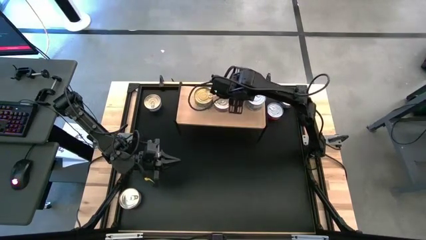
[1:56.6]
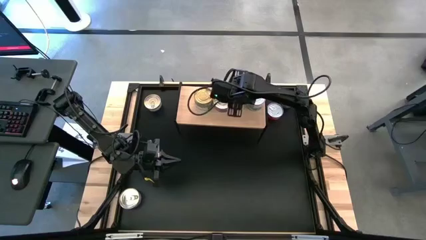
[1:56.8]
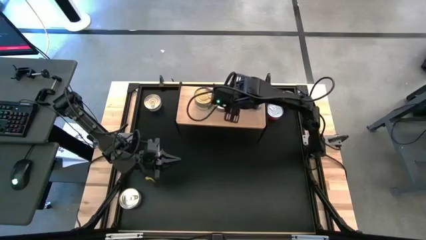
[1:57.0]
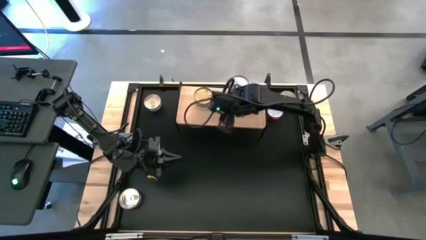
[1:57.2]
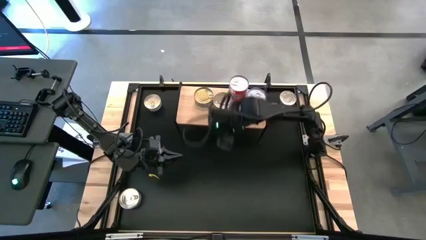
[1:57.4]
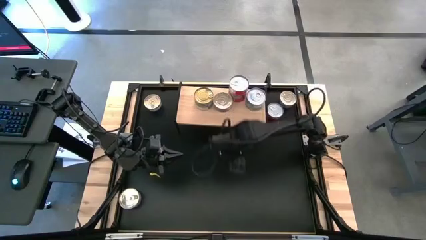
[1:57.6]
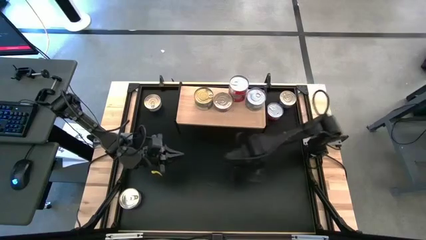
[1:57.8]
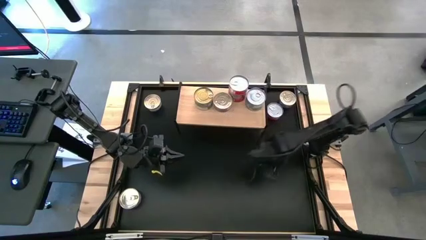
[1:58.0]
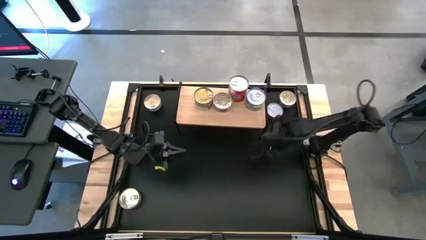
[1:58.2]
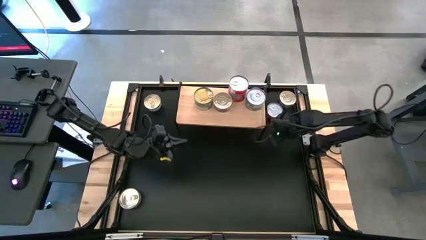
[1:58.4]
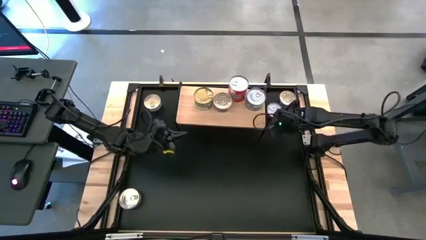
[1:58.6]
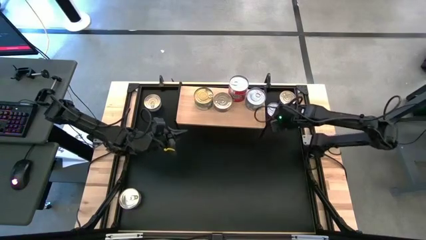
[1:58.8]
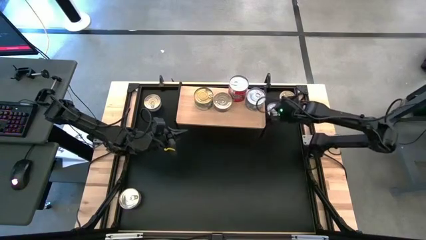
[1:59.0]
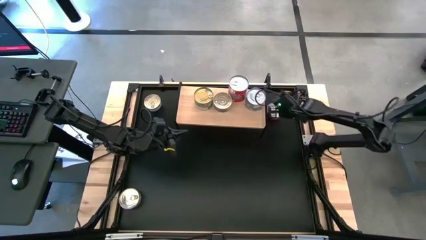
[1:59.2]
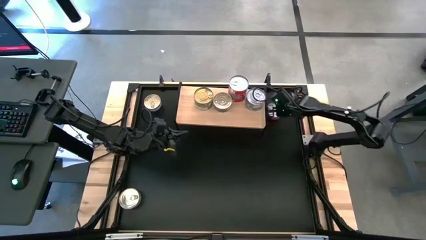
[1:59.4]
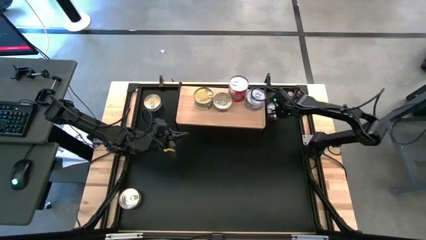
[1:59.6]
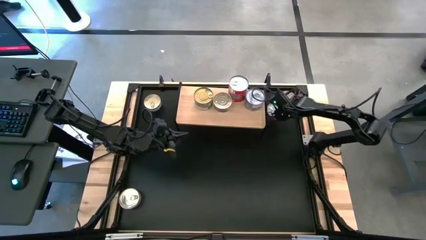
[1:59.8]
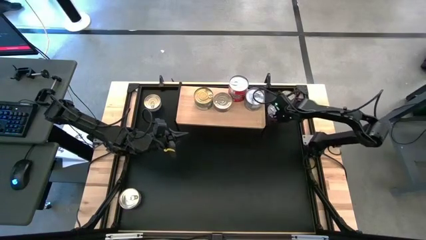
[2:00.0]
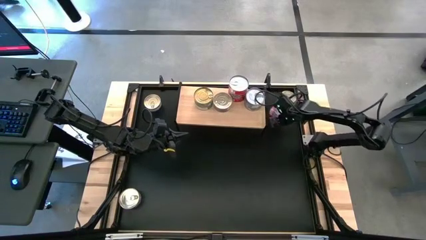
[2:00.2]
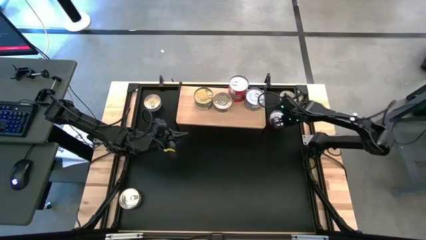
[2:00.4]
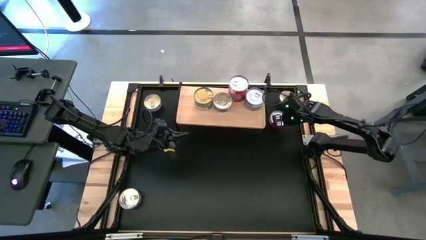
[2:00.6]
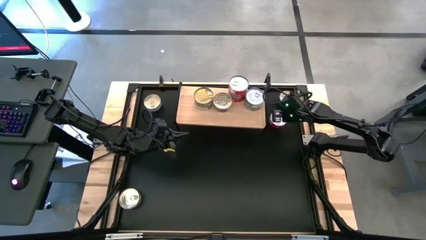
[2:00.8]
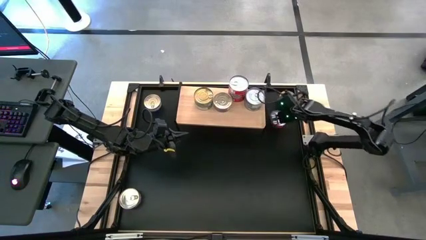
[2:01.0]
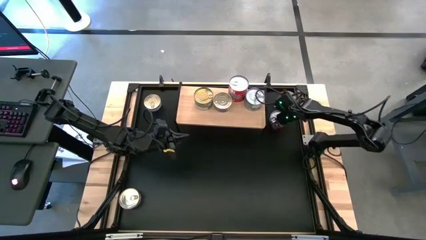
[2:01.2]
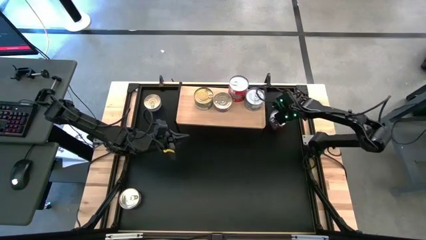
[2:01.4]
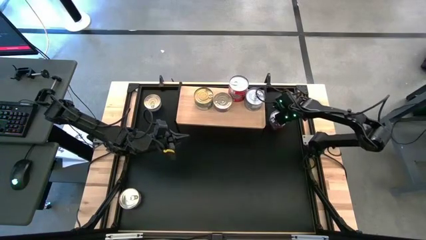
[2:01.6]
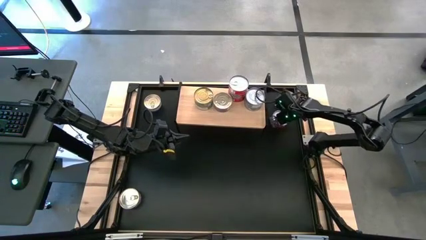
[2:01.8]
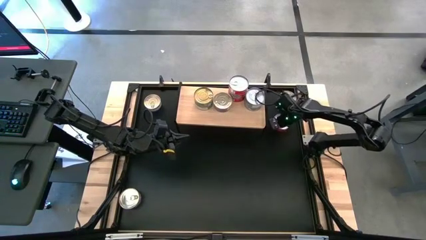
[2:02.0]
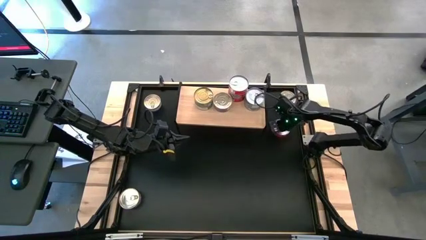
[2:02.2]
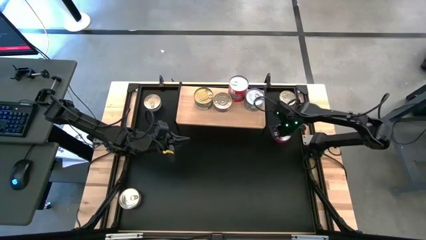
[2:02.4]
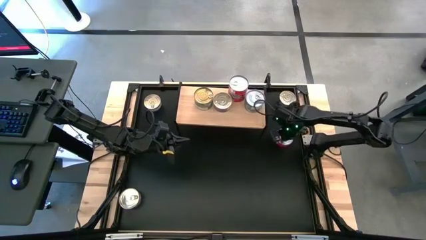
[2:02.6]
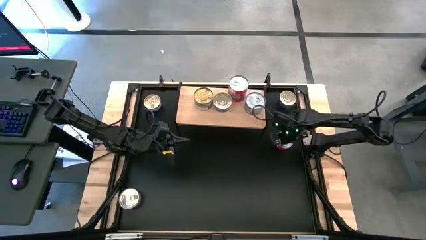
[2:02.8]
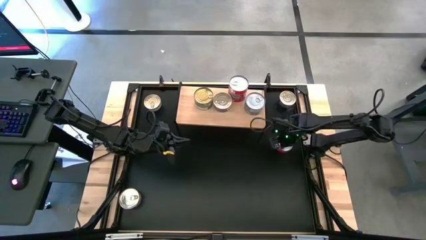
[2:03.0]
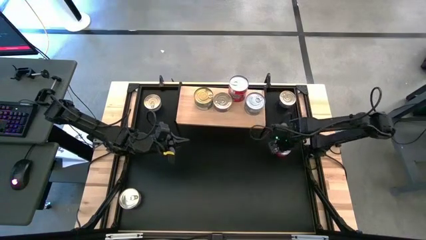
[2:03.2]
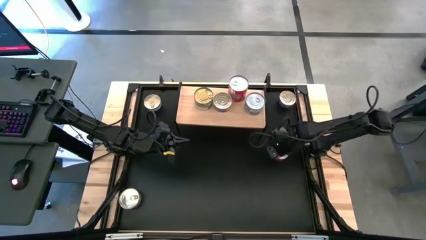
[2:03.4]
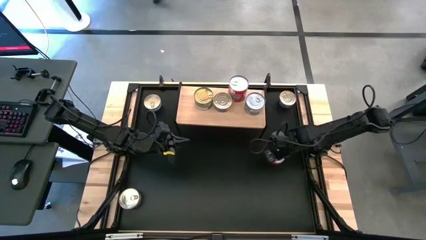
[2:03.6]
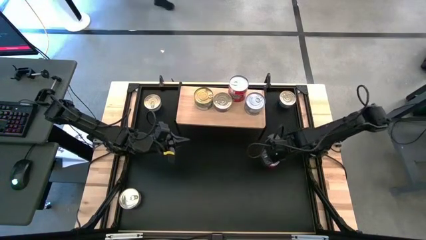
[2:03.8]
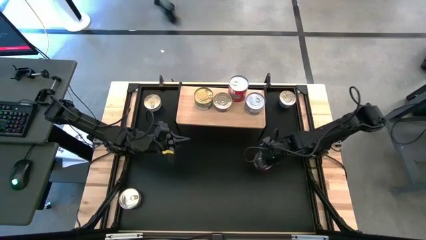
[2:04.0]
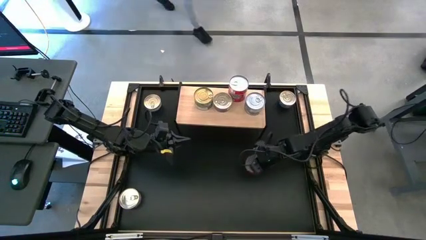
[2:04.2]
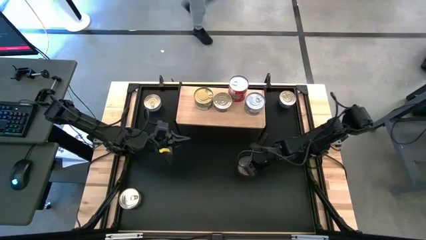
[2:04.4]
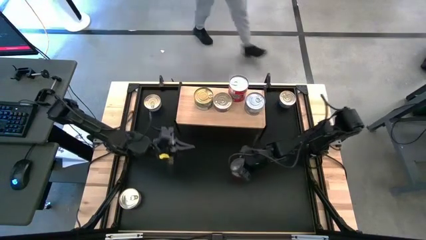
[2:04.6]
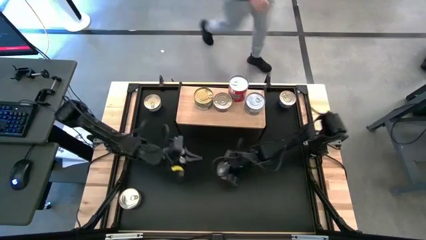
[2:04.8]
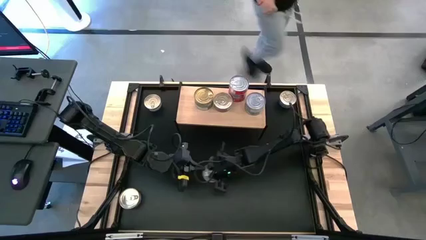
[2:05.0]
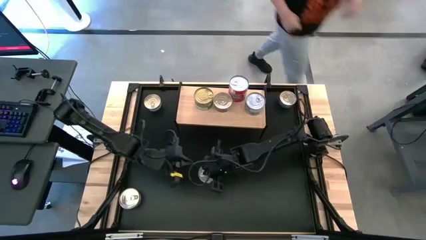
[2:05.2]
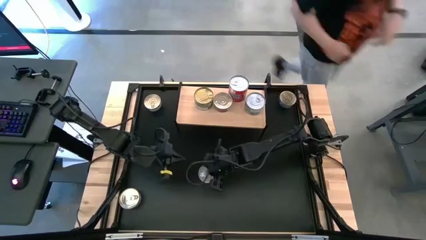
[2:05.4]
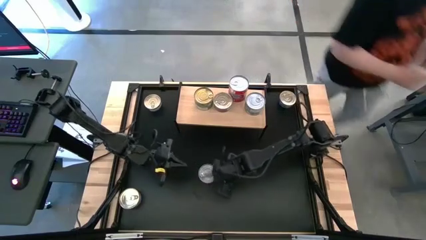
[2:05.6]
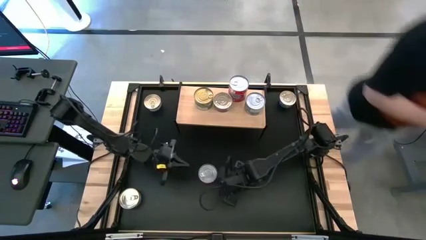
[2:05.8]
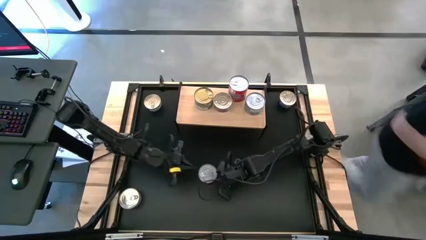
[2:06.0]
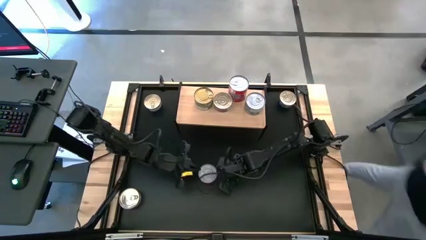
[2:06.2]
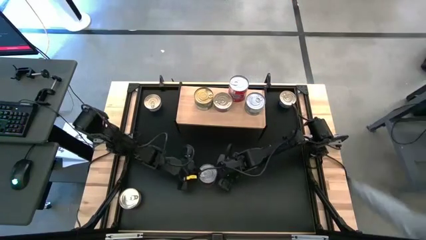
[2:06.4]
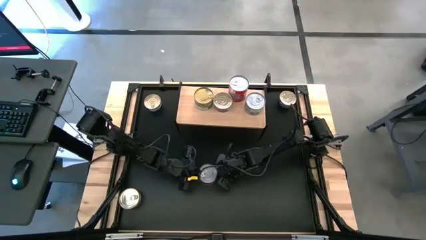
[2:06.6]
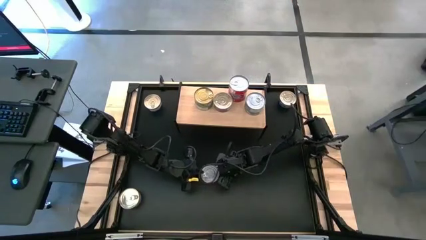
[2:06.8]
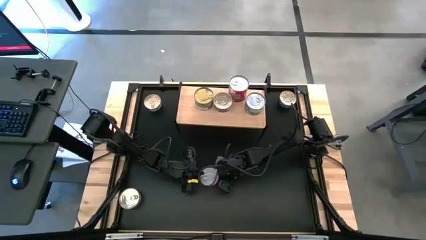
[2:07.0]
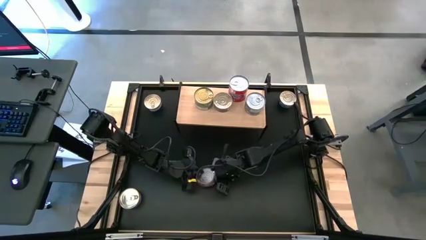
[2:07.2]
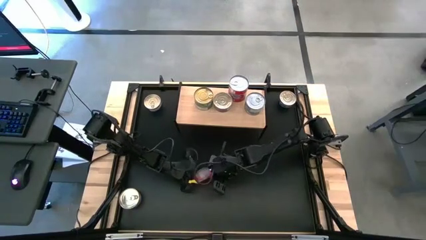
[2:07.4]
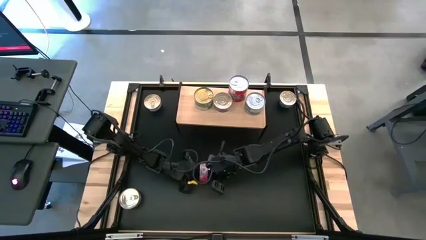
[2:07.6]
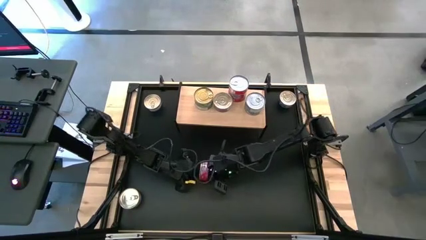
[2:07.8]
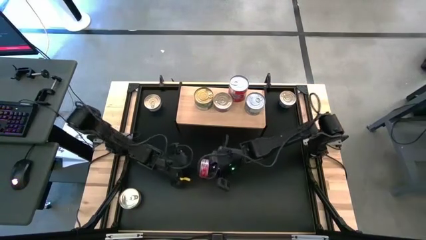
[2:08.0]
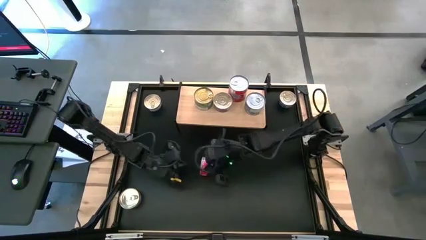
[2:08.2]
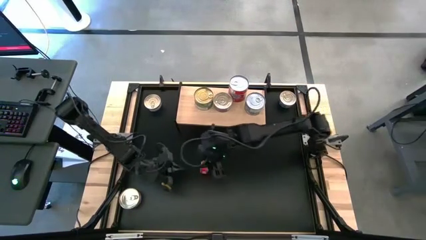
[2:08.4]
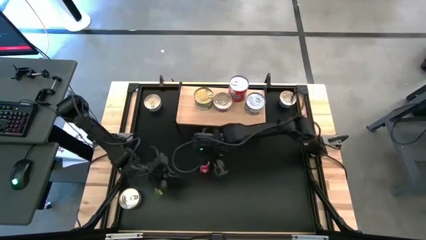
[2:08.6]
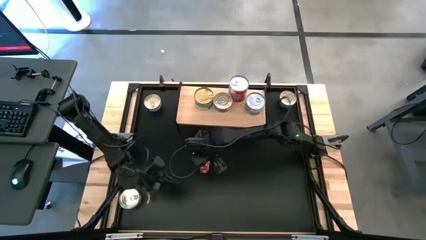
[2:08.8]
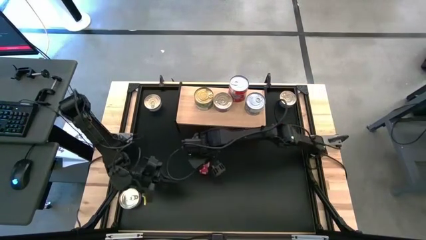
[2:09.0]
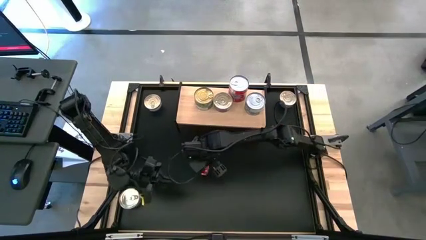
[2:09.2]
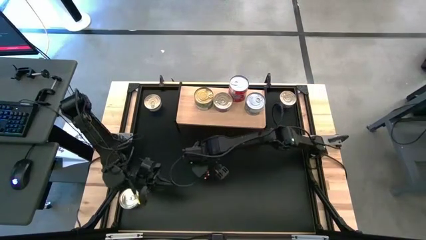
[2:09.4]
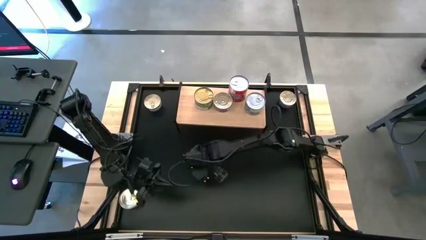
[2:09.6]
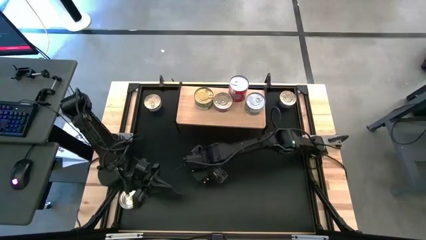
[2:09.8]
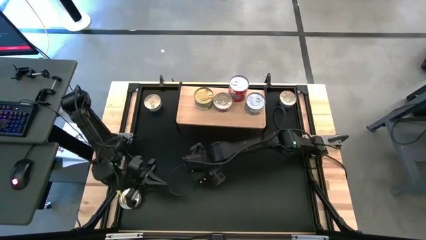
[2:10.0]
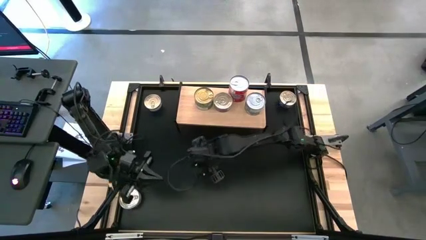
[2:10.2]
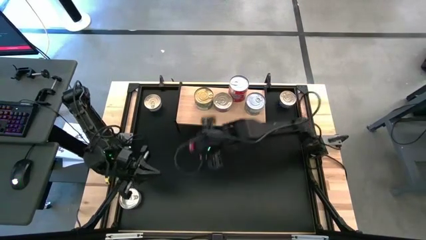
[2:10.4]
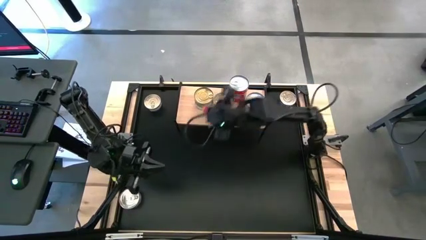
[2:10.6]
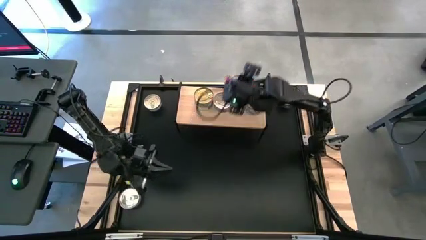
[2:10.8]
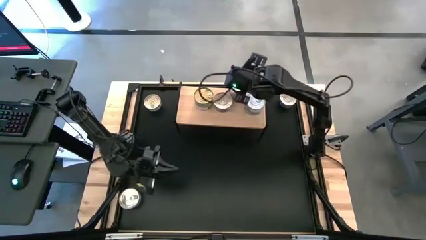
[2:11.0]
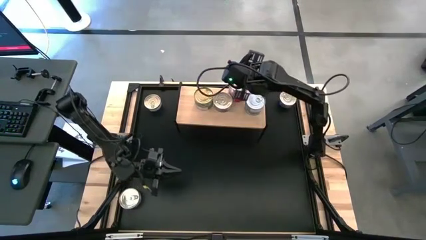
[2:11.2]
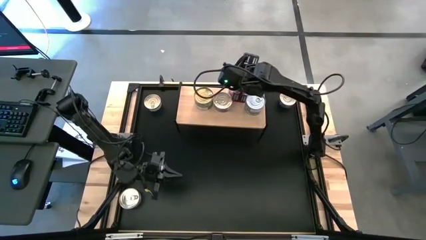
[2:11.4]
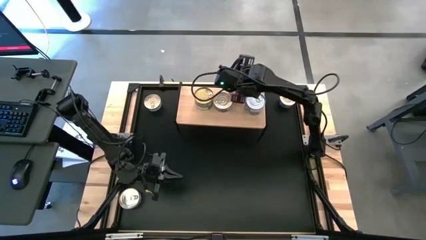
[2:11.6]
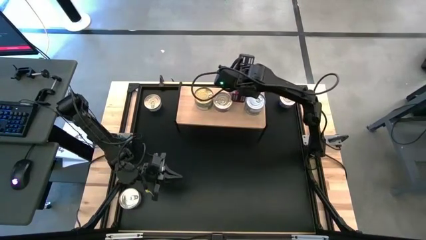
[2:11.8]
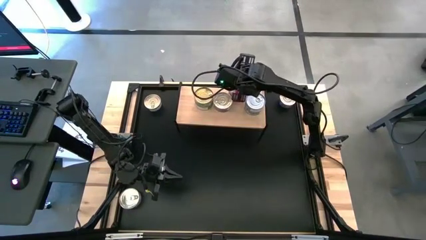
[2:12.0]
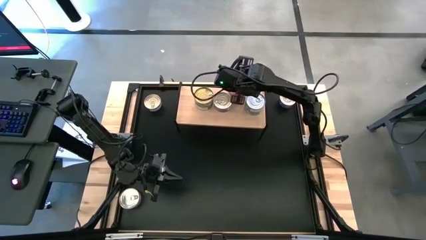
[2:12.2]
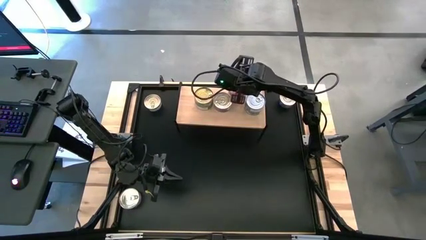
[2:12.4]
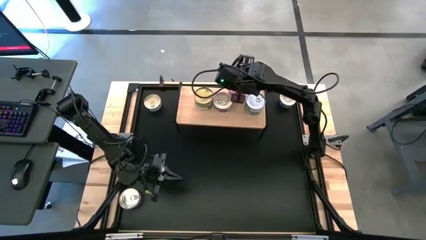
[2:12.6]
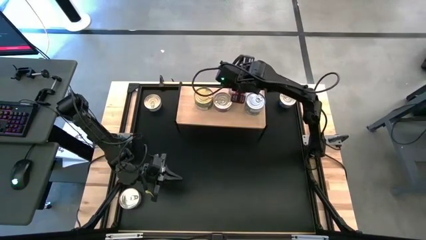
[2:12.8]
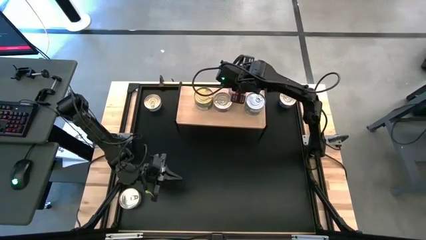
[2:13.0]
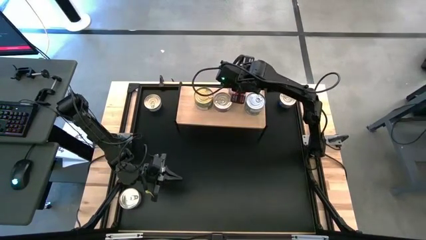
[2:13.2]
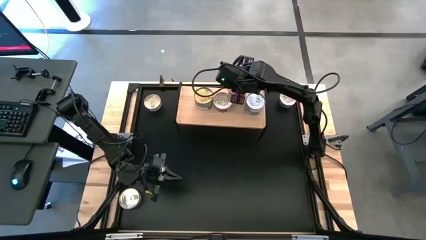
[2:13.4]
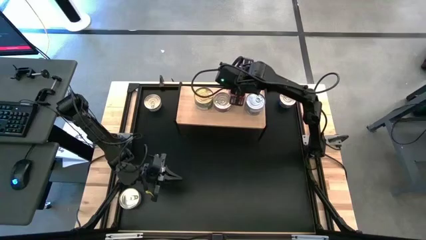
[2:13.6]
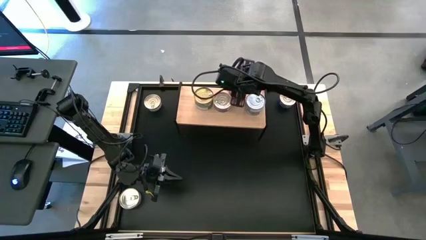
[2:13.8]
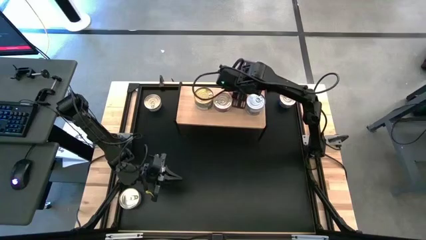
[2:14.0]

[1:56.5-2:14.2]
Task: Stack canned seafood by type on shelf
Stack the red tuna can on top of the red tuna can on the shelf
